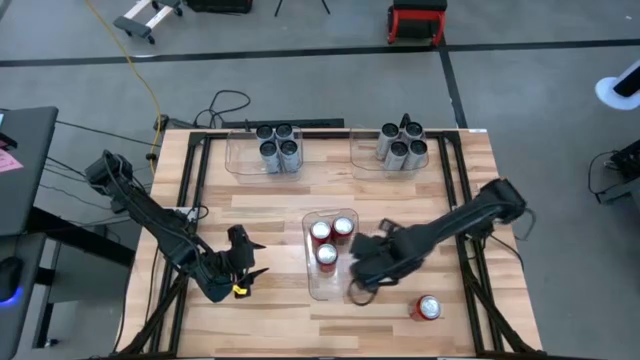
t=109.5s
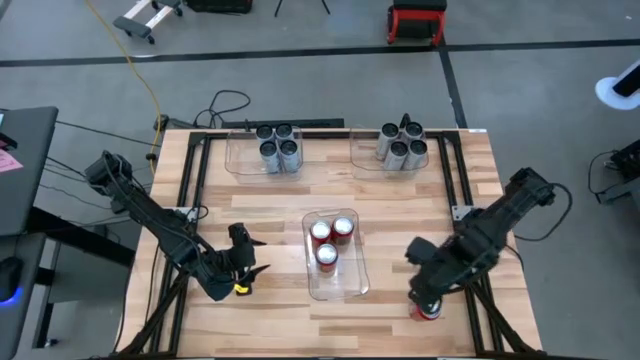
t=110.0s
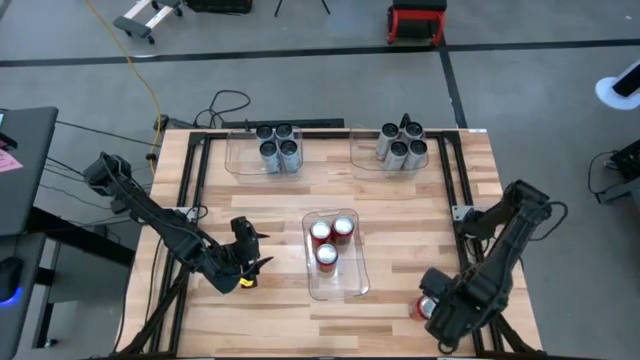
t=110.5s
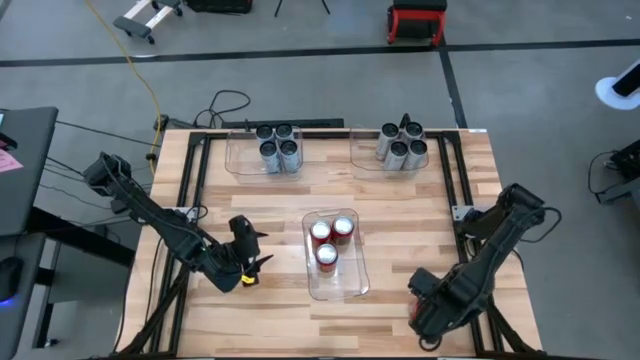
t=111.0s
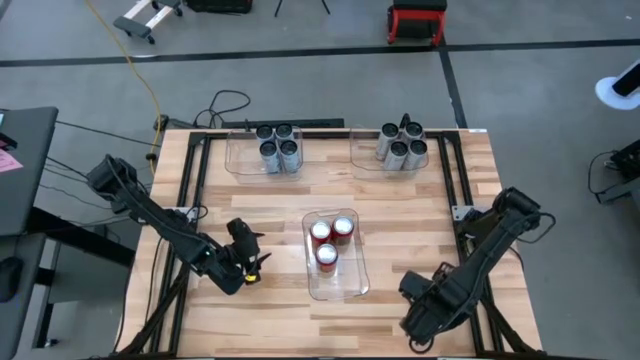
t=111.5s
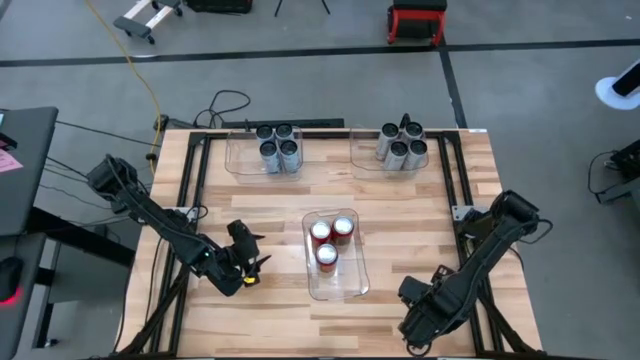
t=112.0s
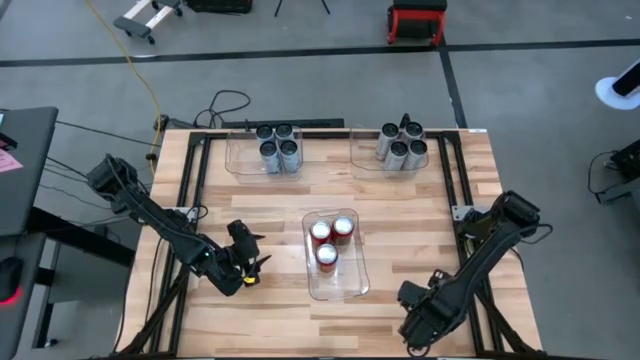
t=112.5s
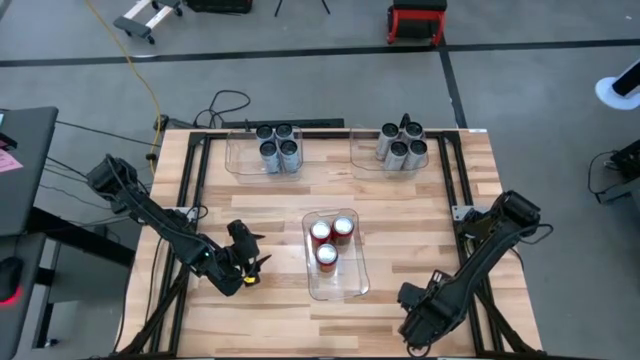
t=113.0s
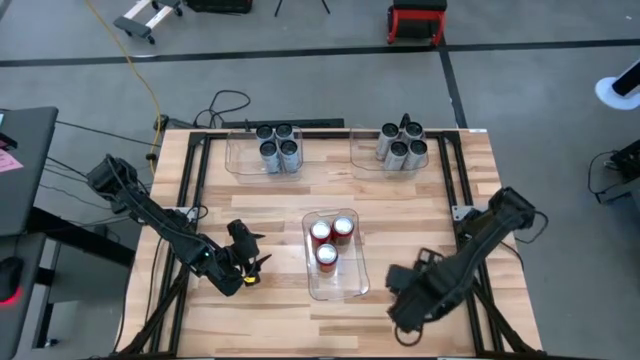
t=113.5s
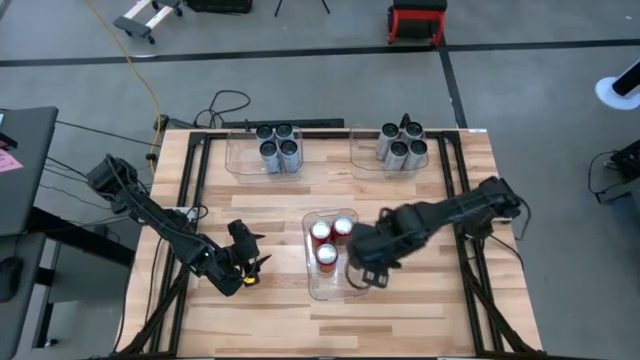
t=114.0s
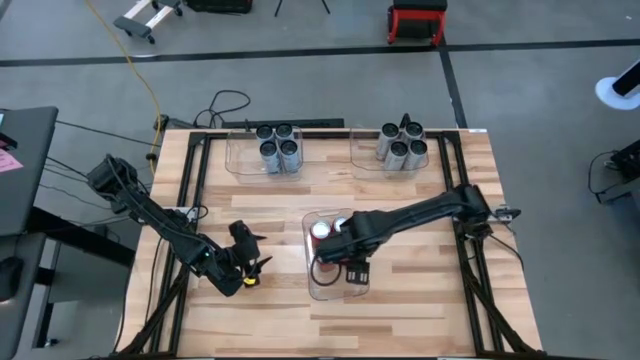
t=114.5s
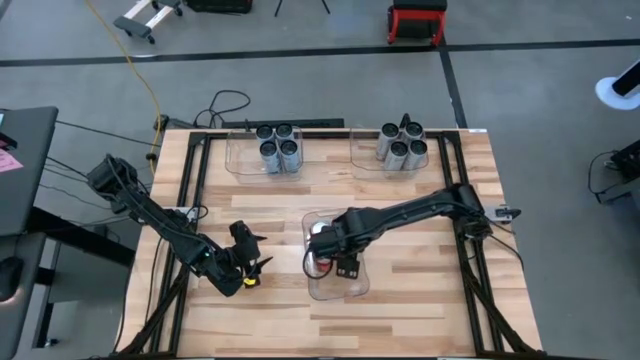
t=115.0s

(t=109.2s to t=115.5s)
Task: Sort soda cans
Put the red-black soda can into the bottom transparent bin

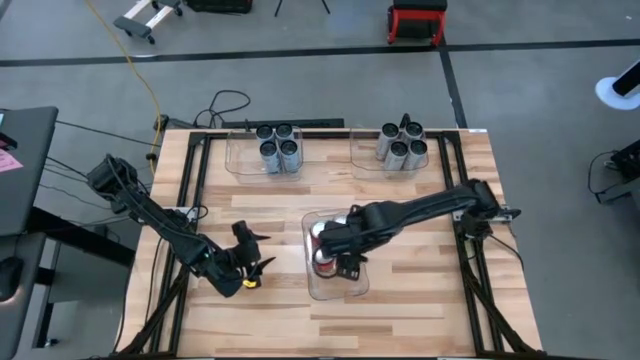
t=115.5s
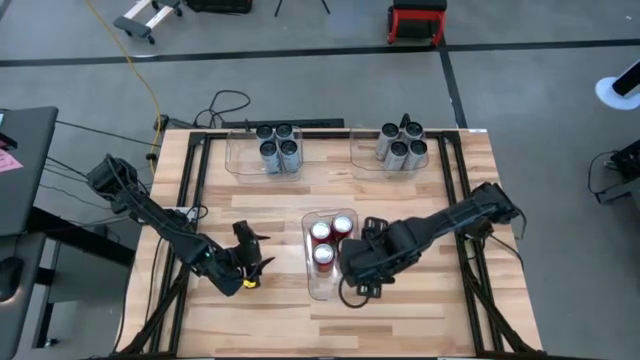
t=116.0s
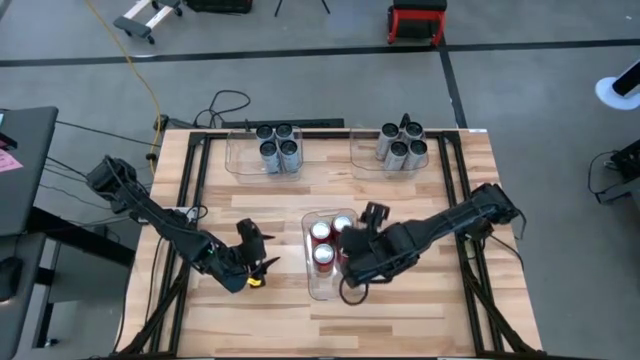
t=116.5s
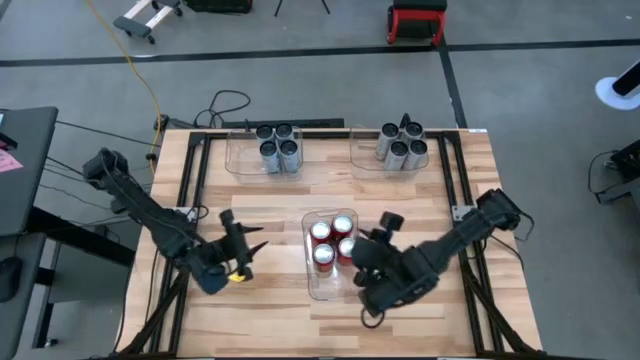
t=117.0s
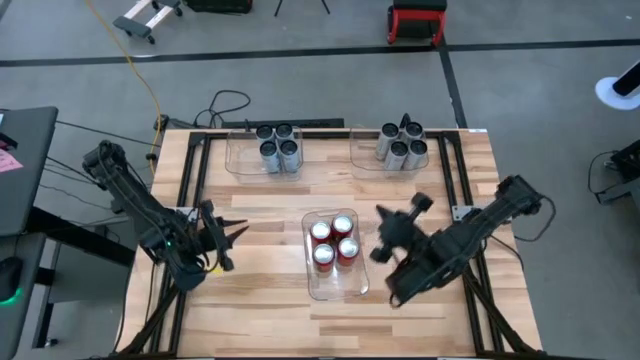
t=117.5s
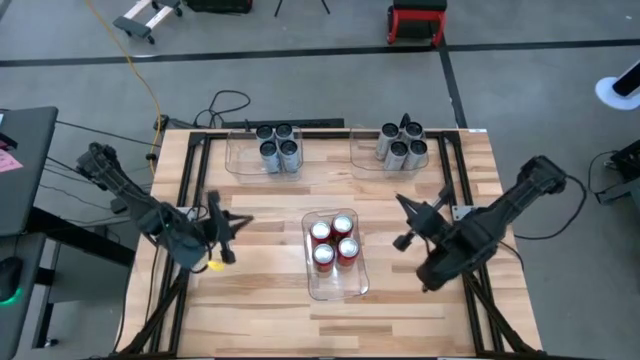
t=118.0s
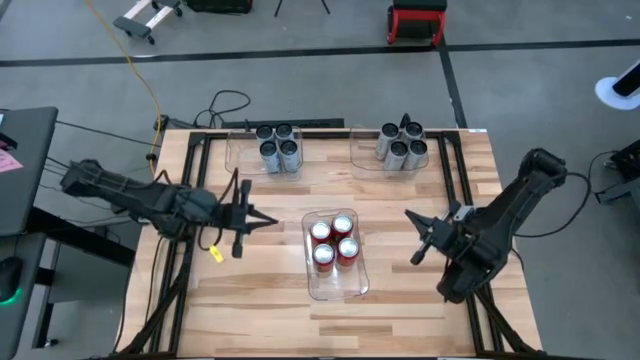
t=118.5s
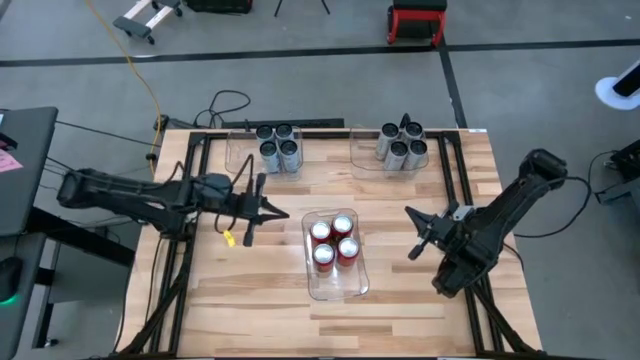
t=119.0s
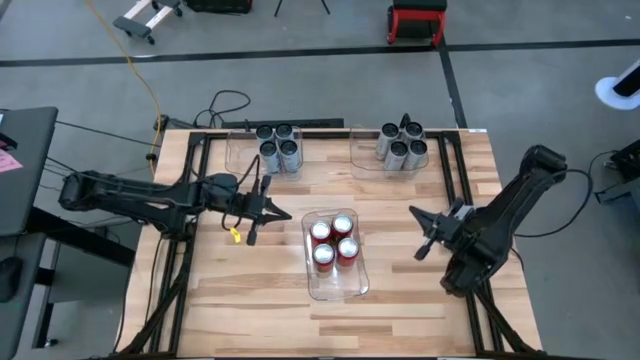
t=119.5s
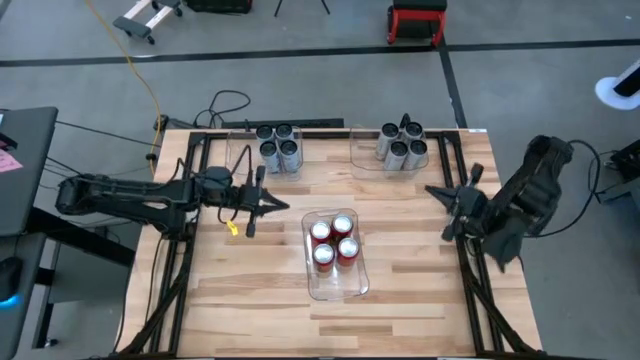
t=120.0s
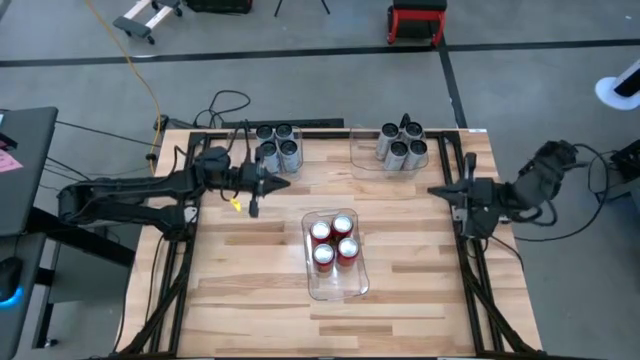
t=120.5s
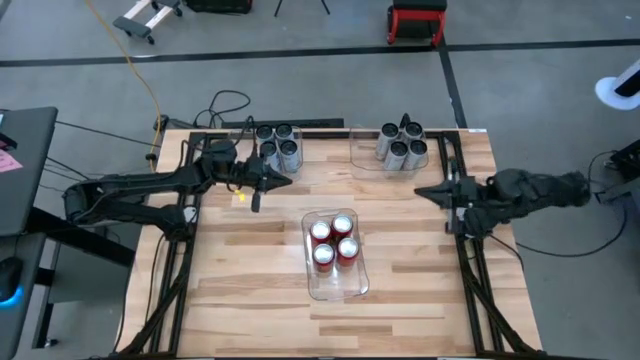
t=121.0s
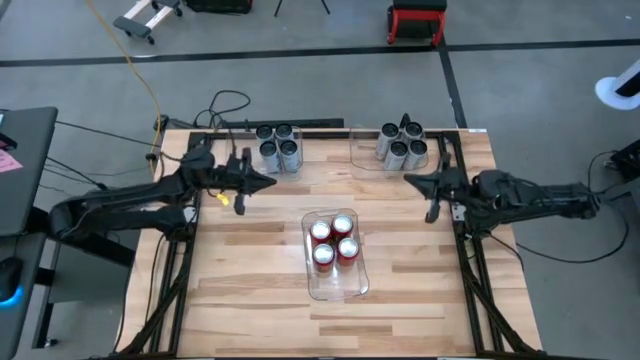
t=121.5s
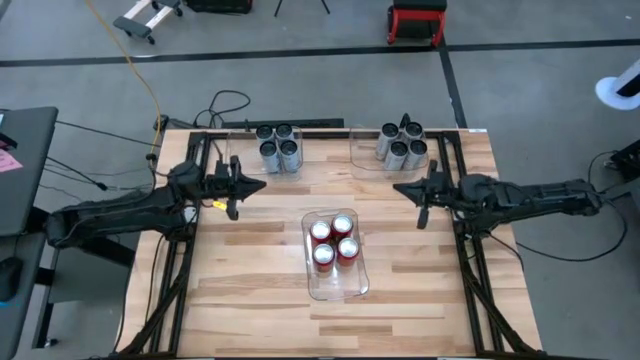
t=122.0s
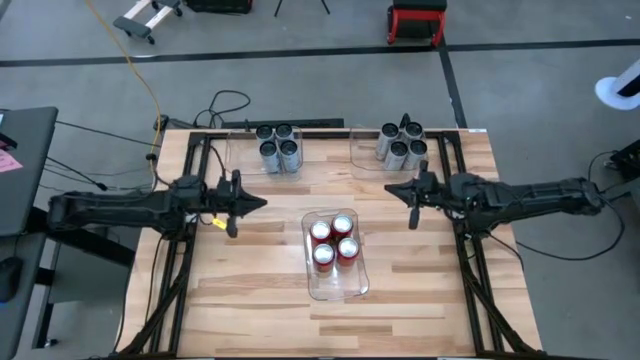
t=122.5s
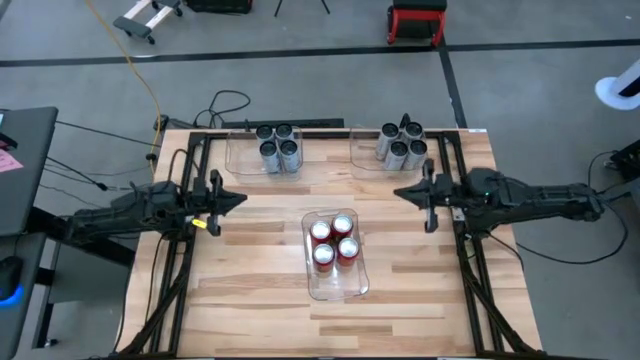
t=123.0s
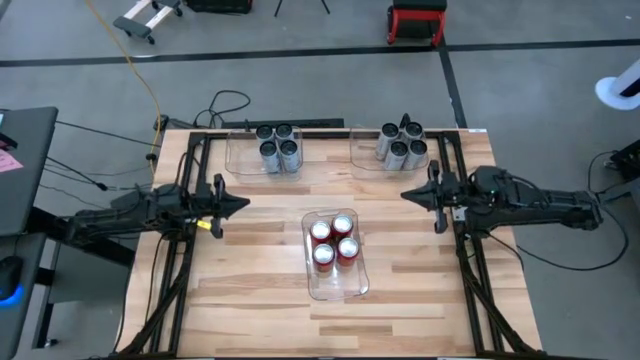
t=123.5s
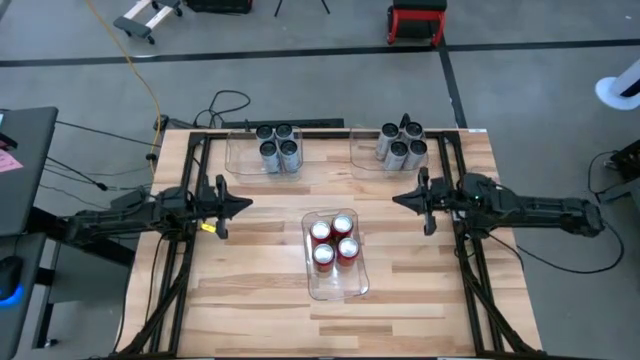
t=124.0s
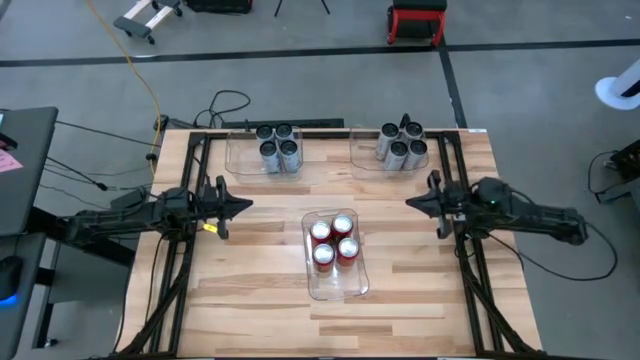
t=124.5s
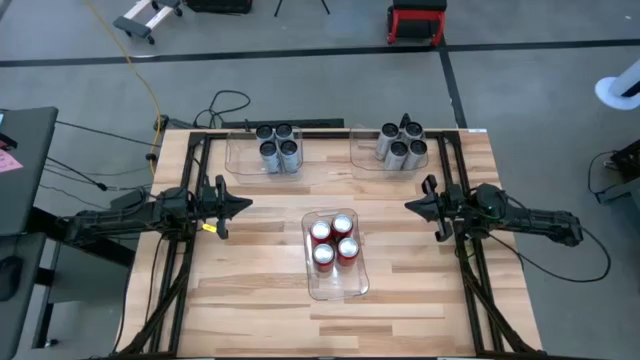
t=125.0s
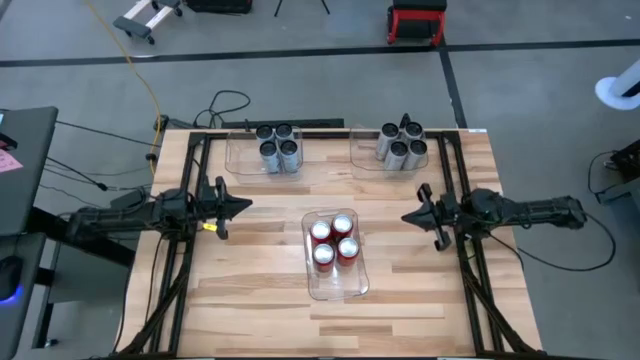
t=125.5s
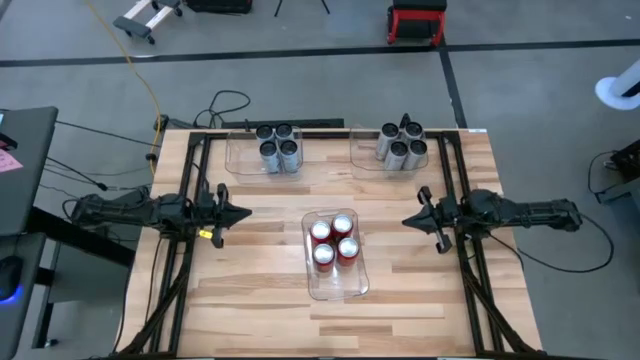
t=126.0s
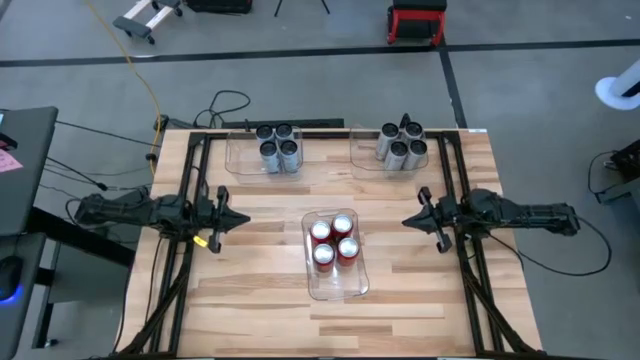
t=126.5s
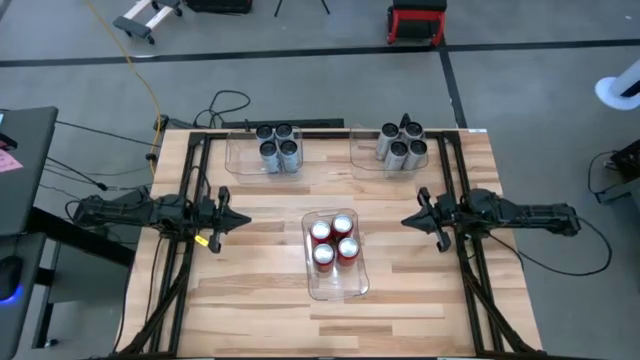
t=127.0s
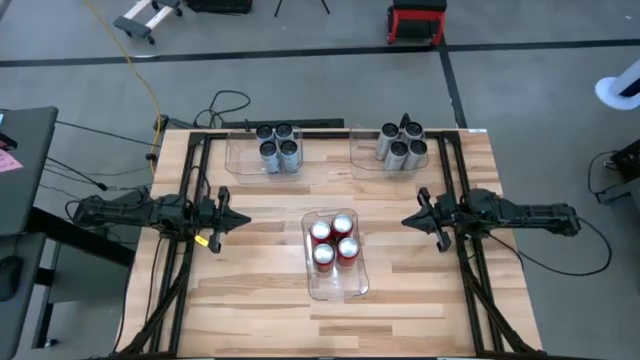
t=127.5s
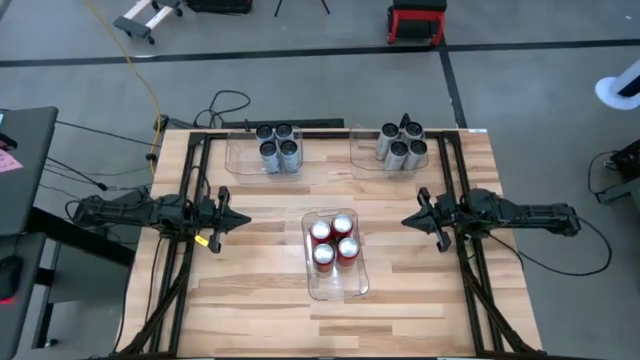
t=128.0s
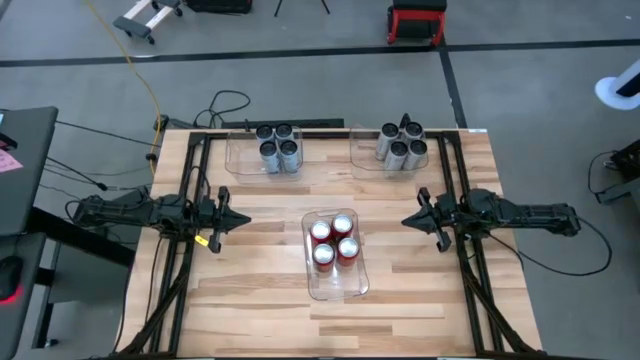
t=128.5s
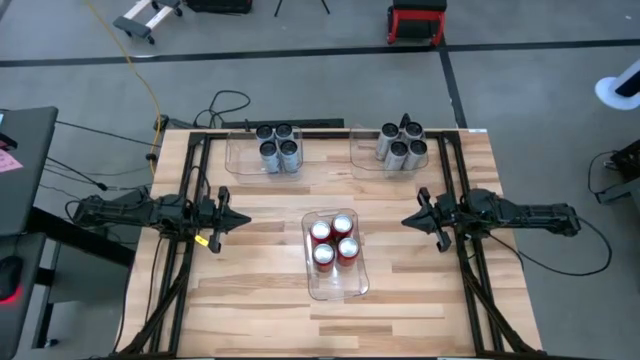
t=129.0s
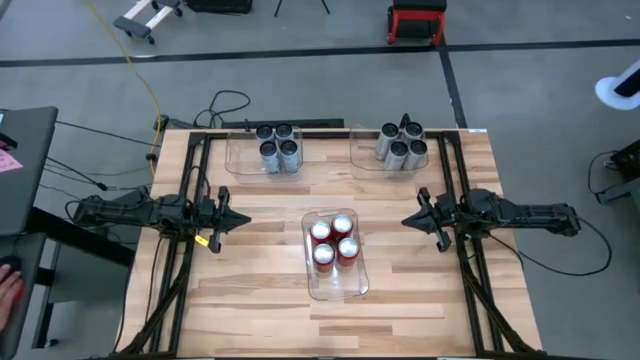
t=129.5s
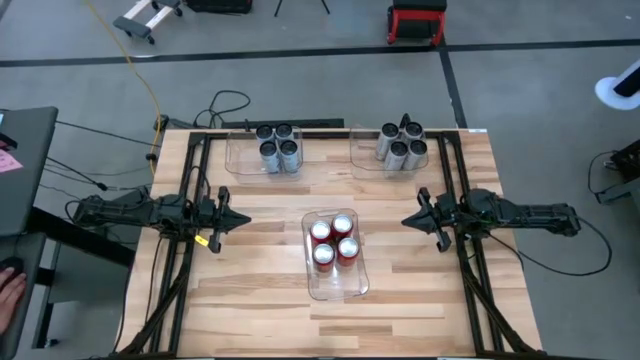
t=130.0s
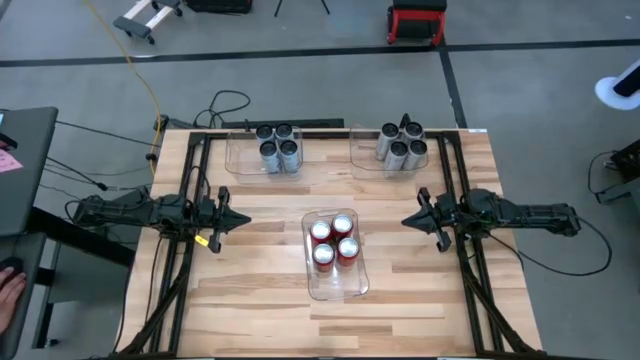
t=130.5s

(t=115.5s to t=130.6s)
Return to Home Position
